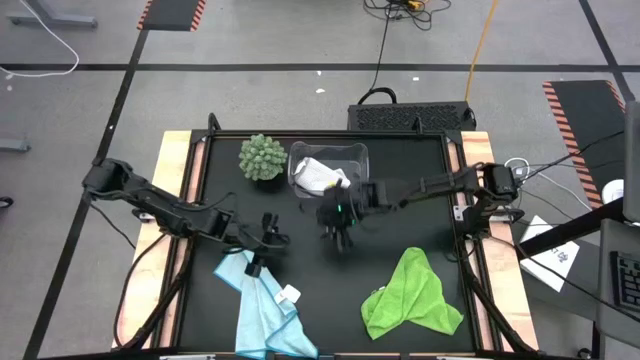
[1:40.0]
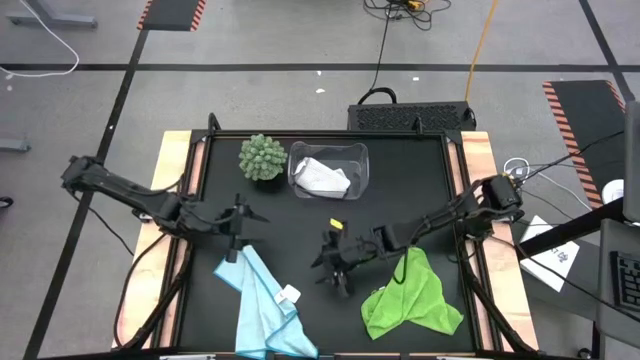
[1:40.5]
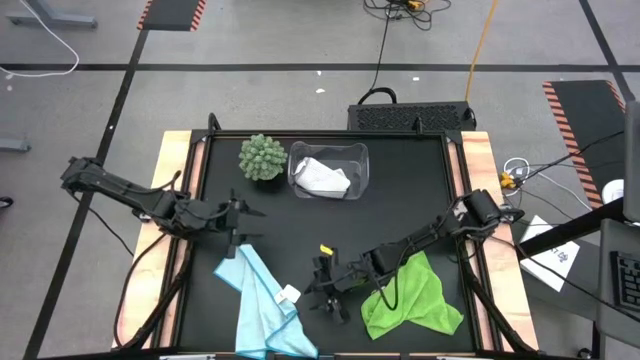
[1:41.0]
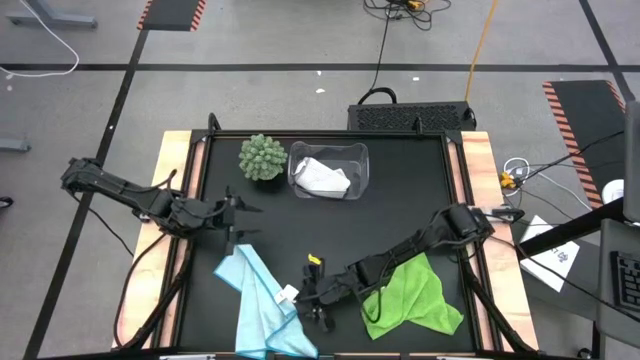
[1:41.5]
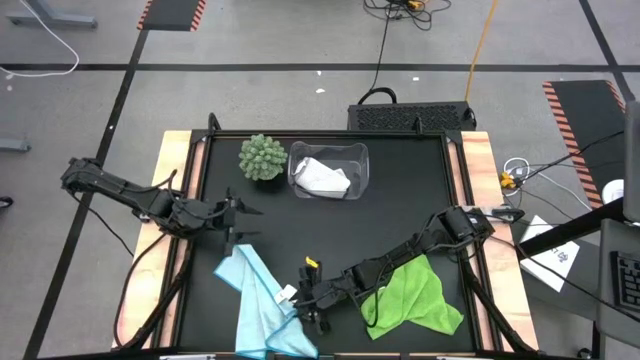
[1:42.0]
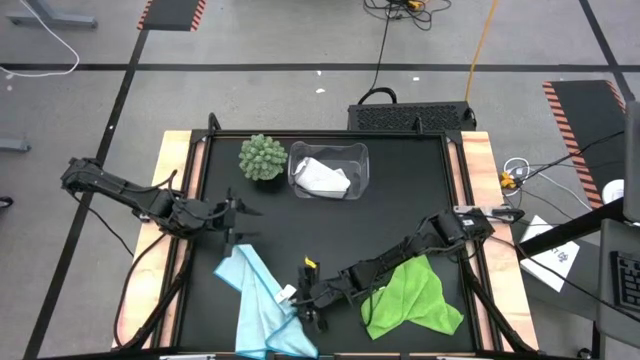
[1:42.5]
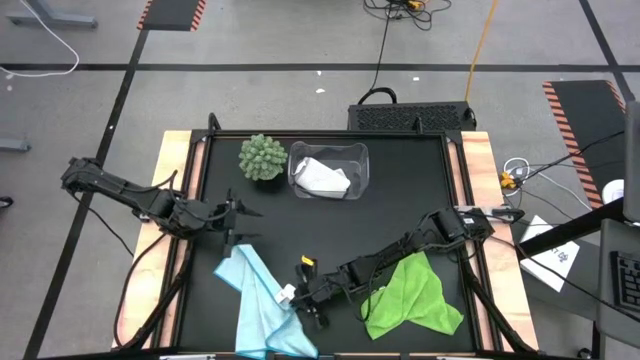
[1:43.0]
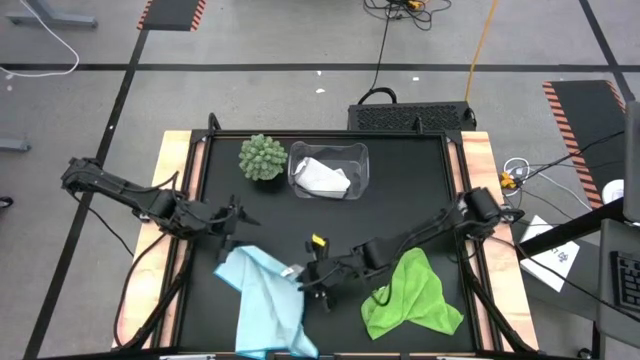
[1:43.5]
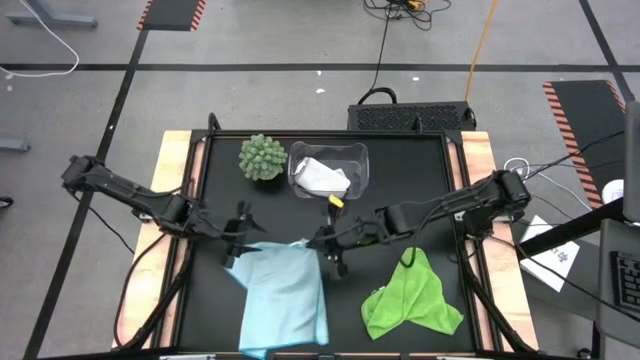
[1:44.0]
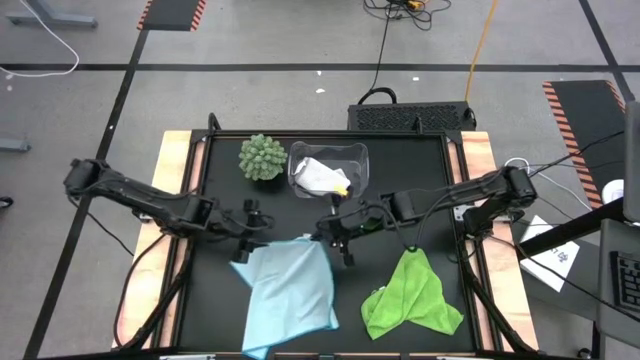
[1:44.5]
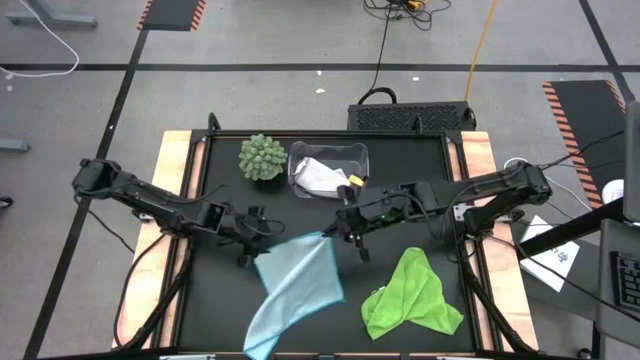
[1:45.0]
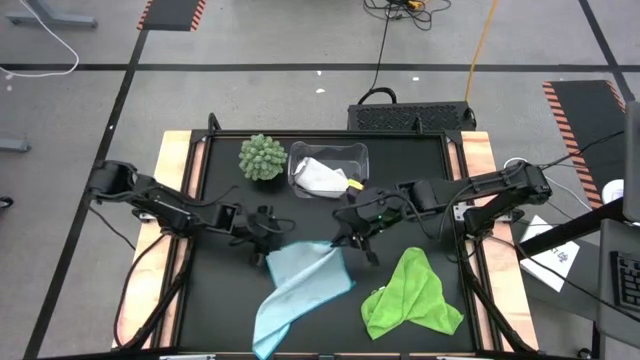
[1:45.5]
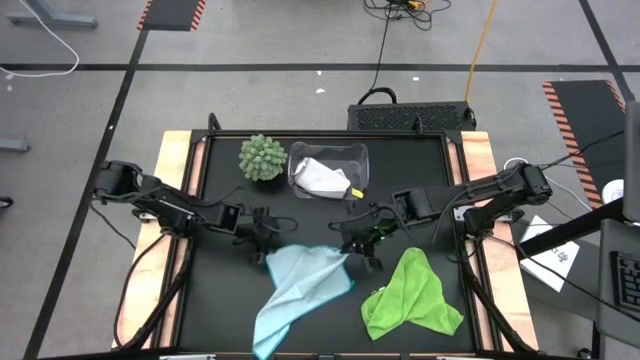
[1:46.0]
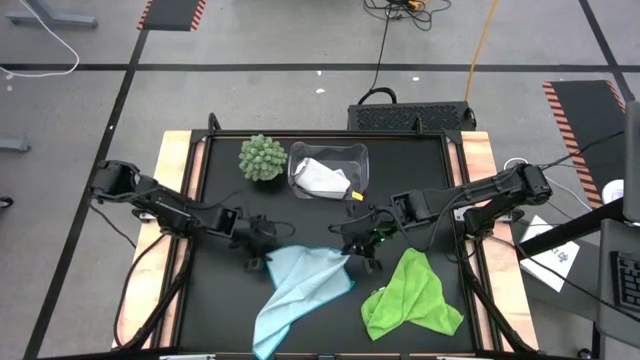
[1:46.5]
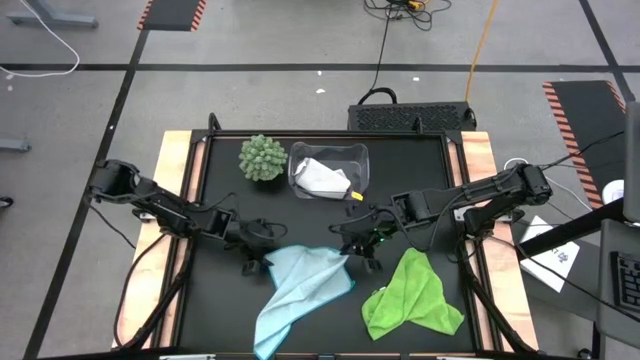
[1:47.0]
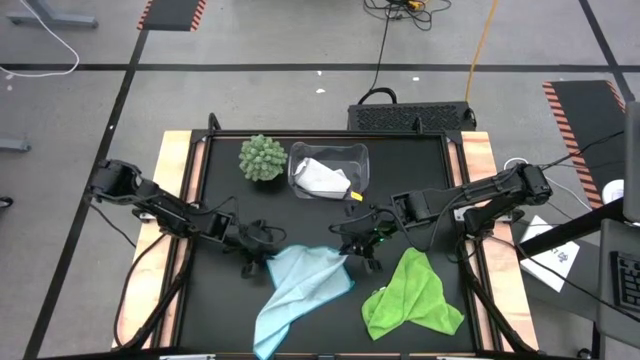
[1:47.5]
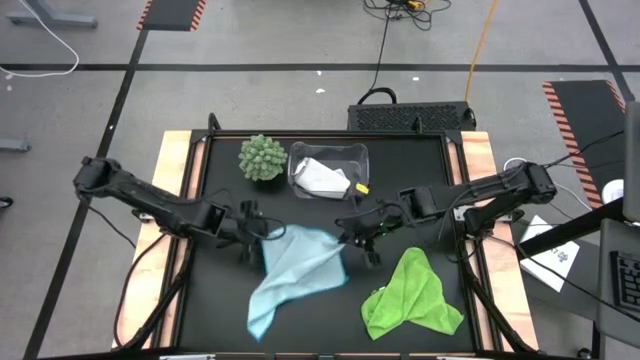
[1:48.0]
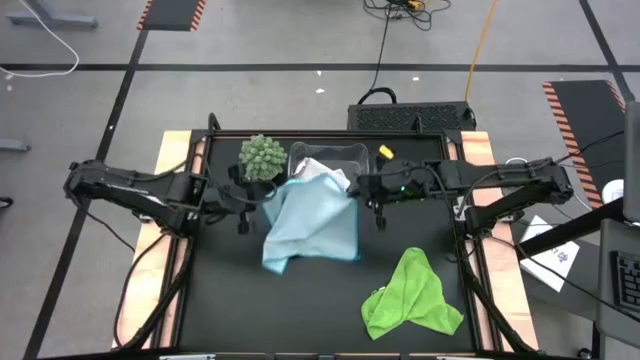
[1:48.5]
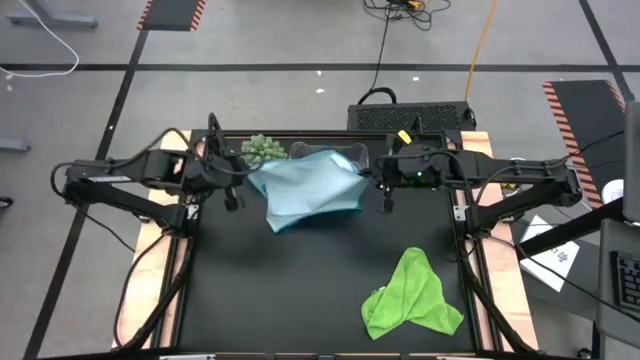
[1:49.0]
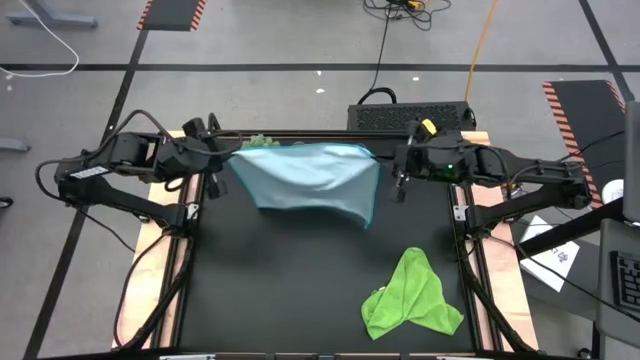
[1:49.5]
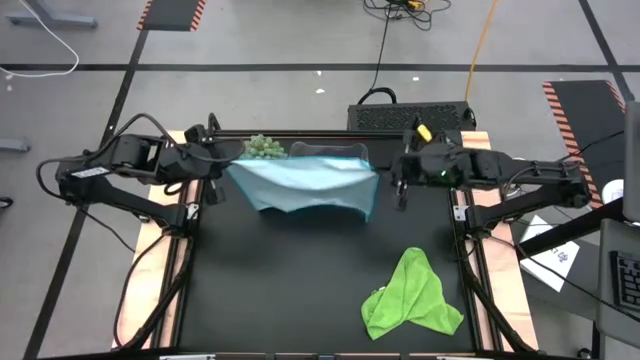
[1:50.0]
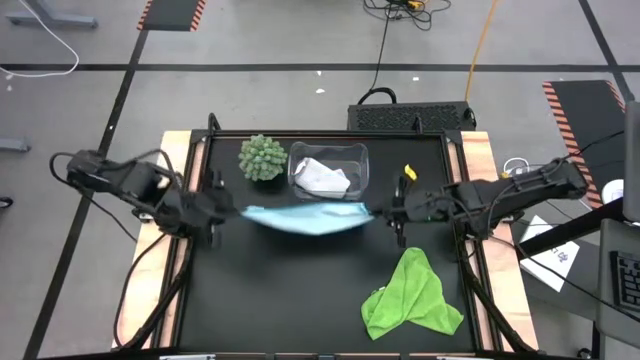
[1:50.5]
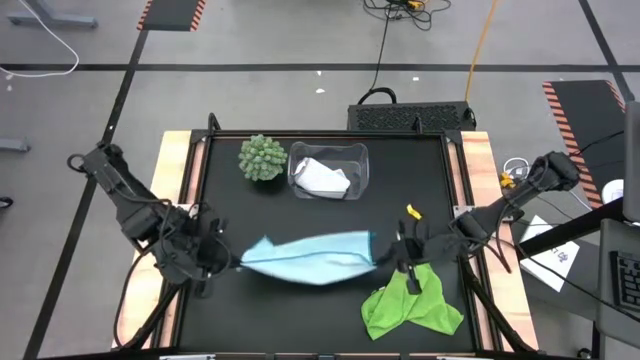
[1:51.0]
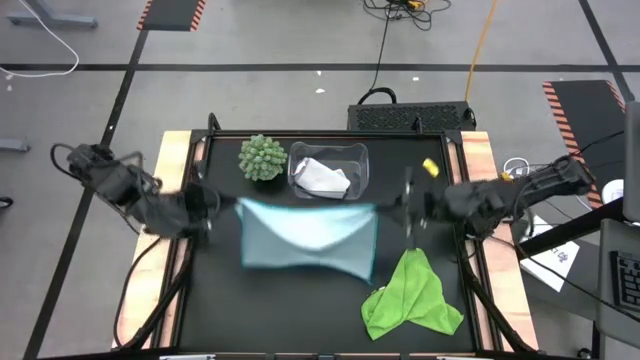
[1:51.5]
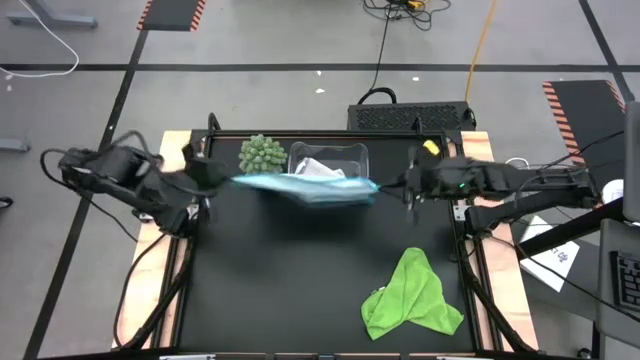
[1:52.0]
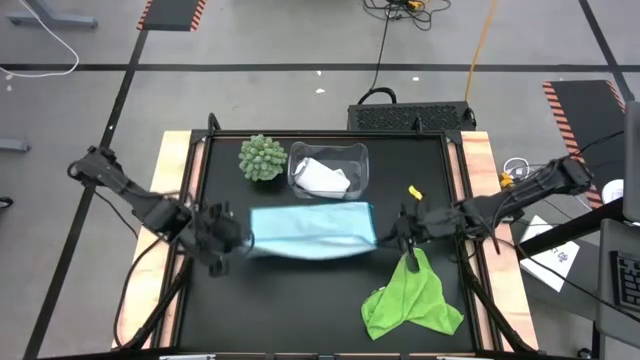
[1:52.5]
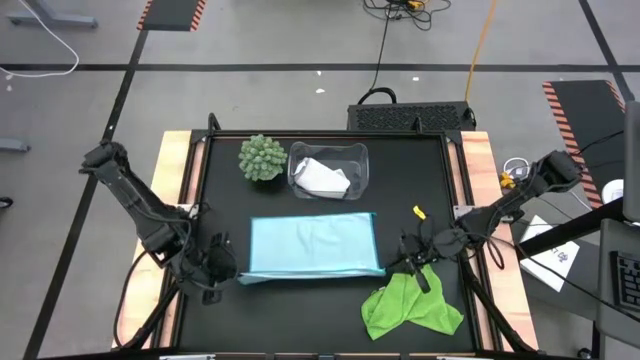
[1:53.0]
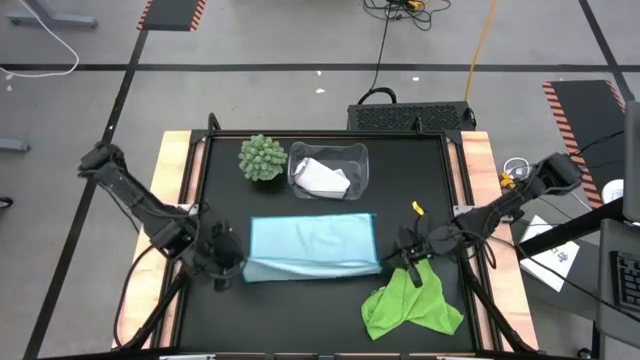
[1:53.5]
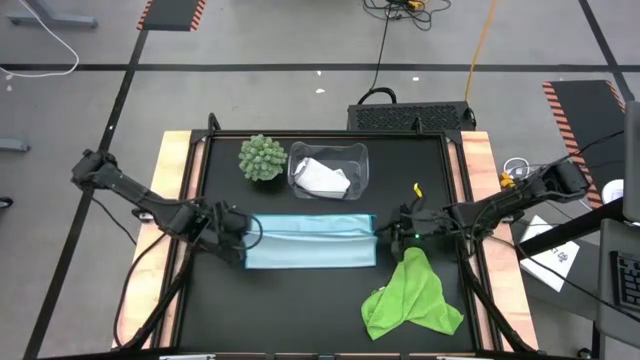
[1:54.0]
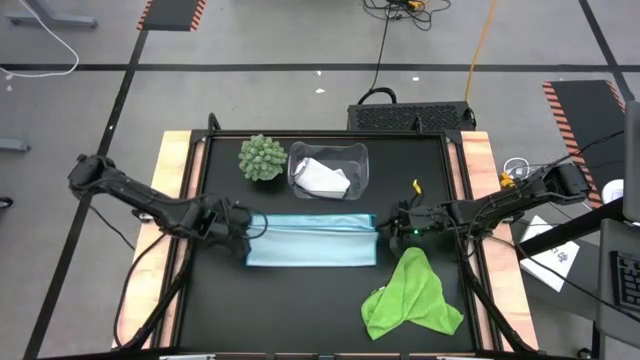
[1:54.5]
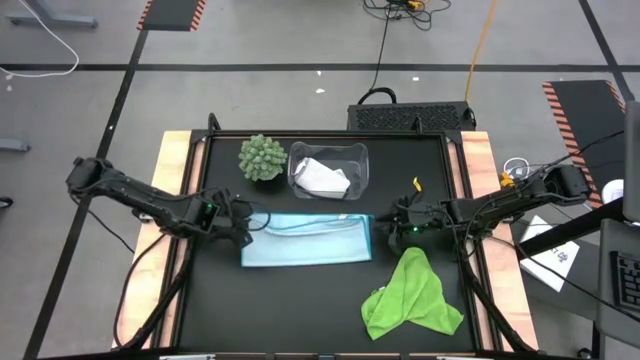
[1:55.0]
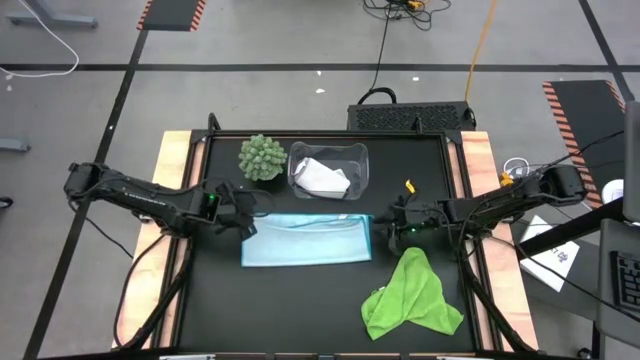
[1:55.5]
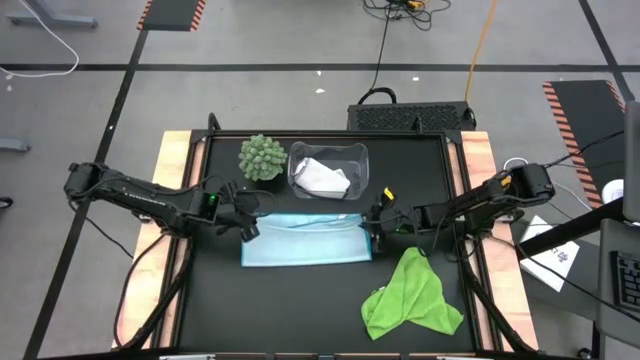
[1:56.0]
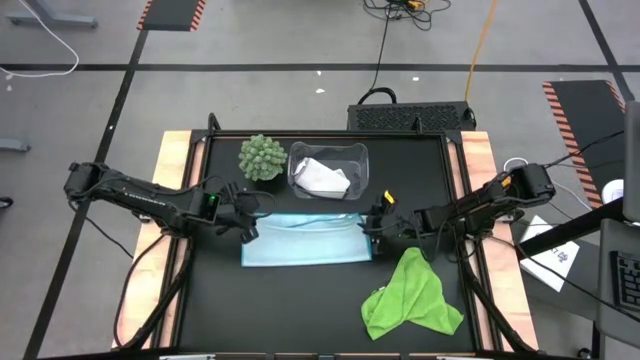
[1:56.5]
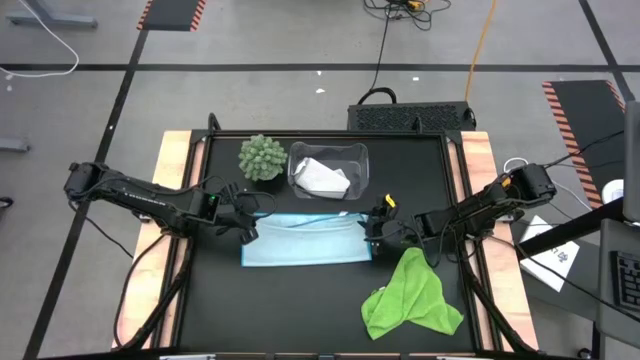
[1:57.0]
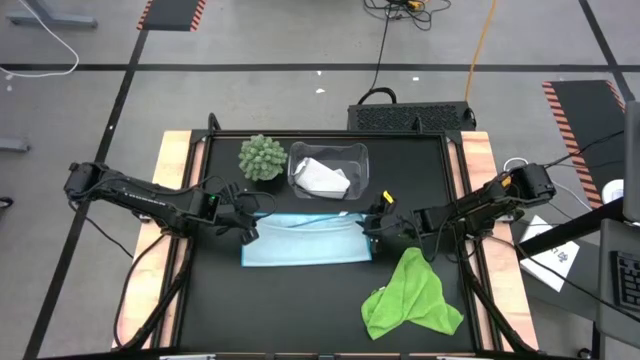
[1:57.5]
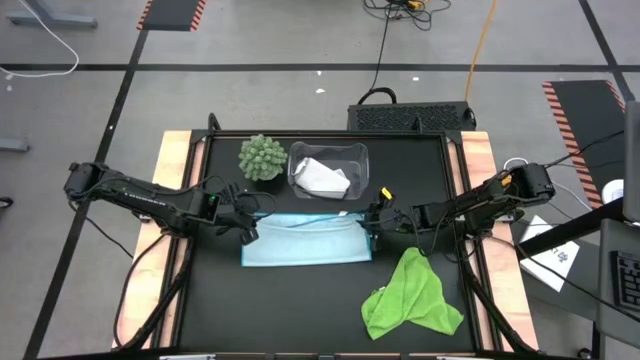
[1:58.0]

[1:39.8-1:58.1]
Task: Fold microfiber towels
Fold the blue towel

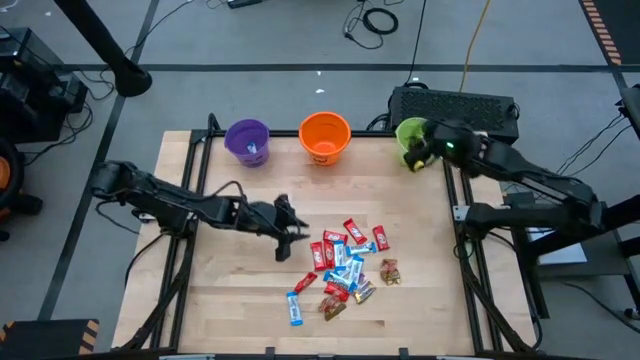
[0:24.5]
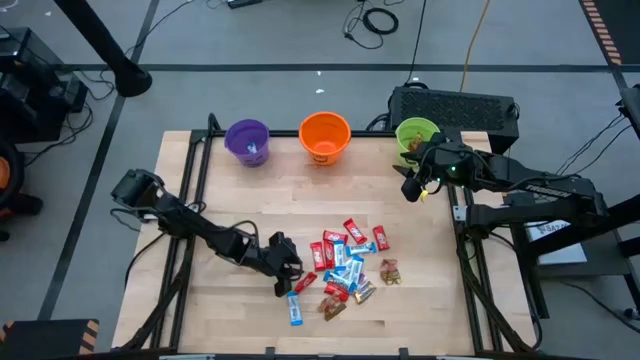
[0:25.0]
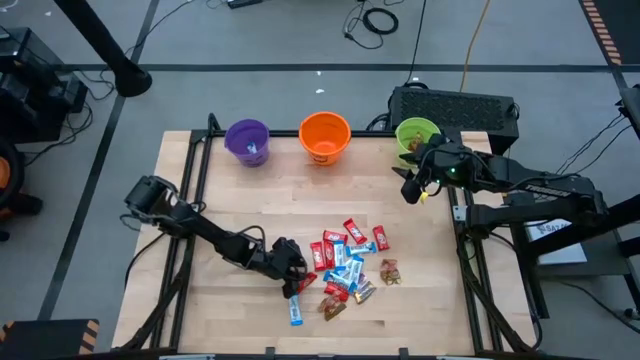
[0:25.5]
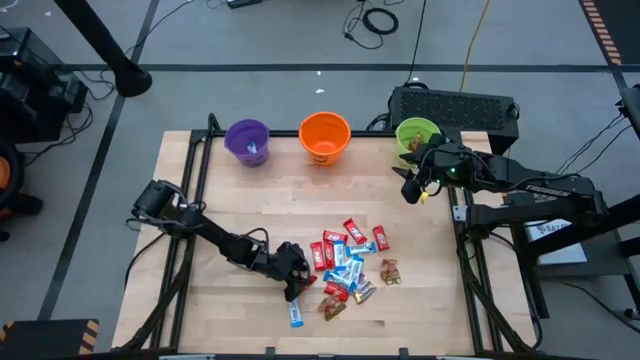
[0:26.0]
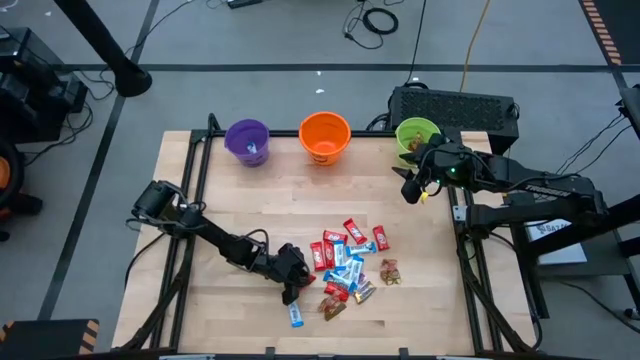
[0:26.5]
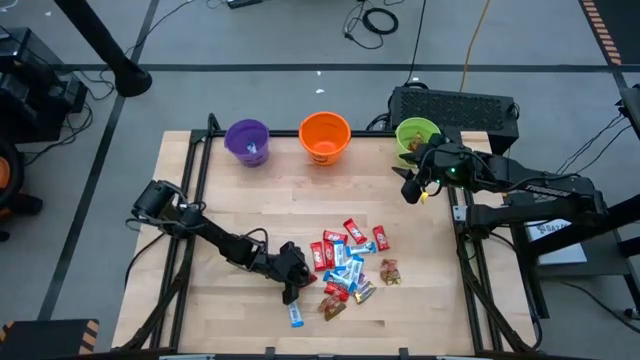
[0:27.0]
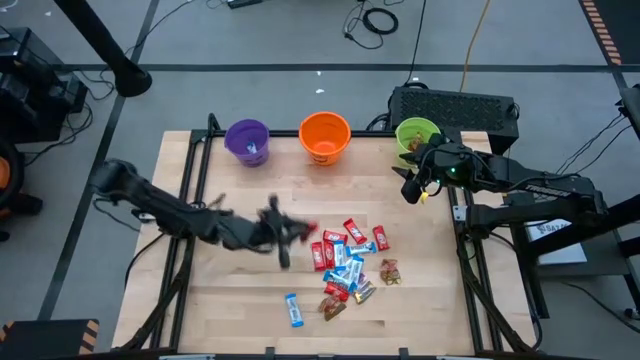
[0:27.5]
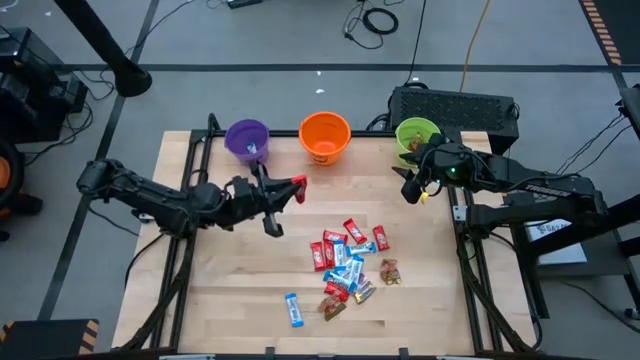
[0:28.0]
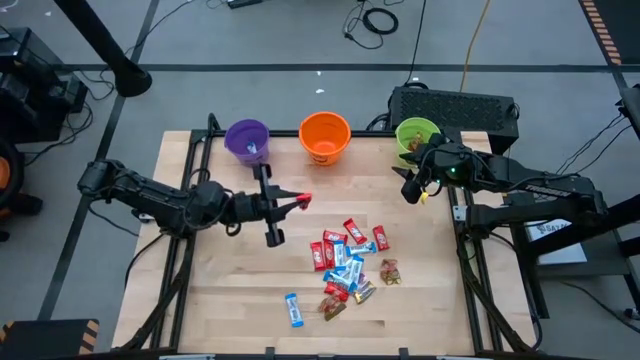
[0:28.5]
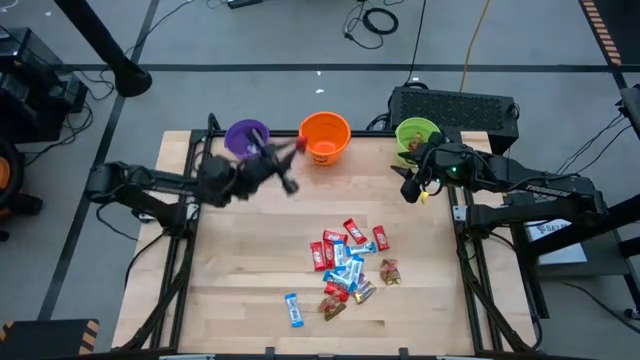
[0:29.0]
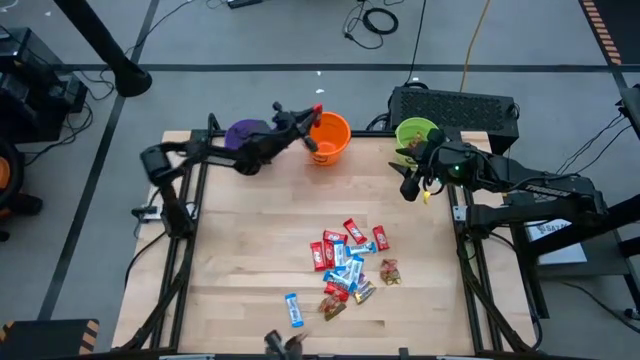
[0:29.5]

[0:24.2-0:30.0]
Task: Sort candy by brand, put in halloween buckets
Put the red chocolate into the orange bucket
